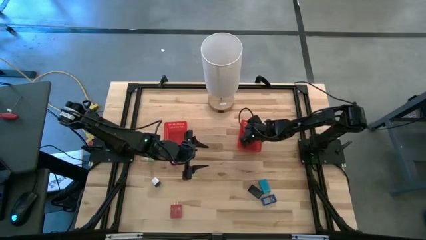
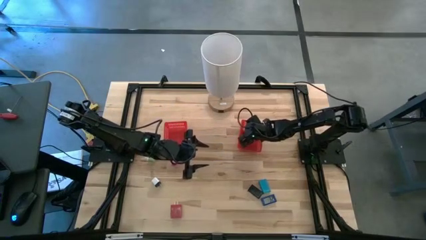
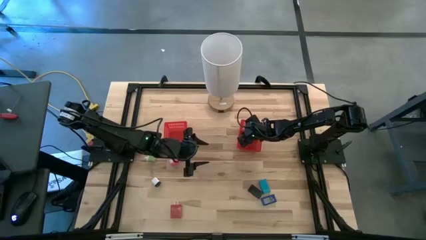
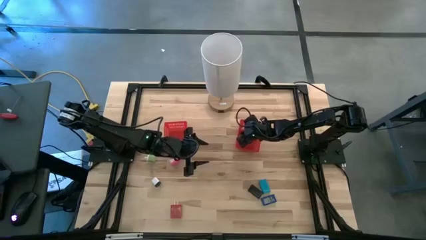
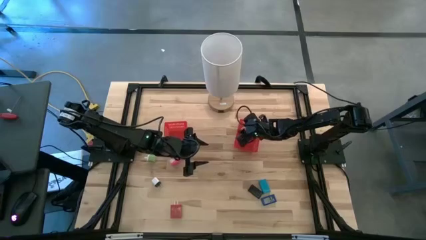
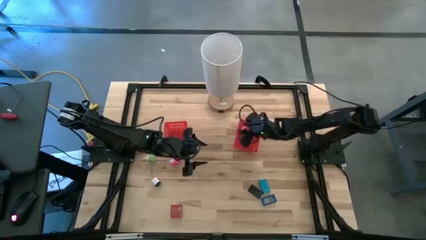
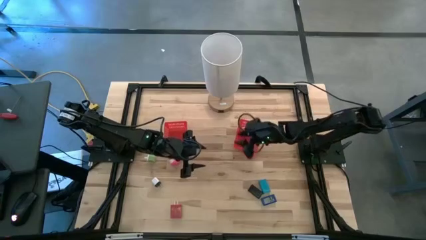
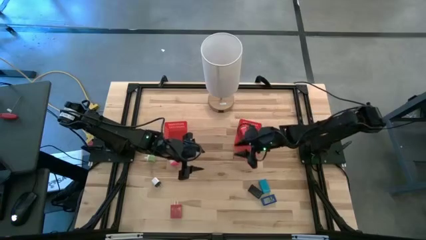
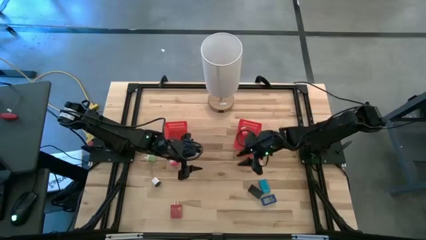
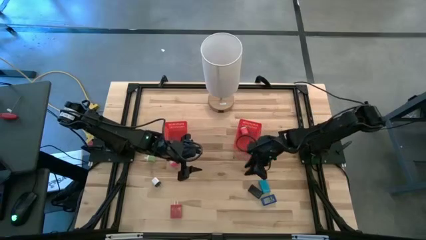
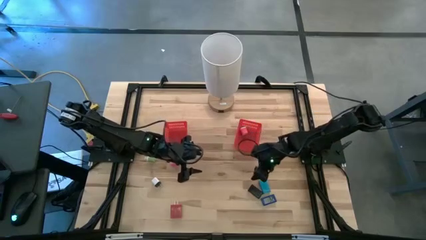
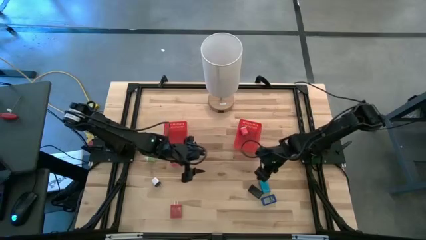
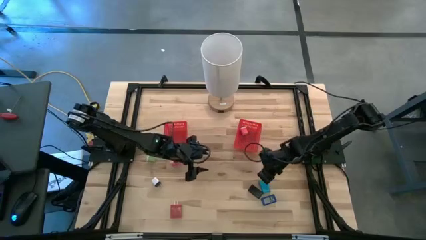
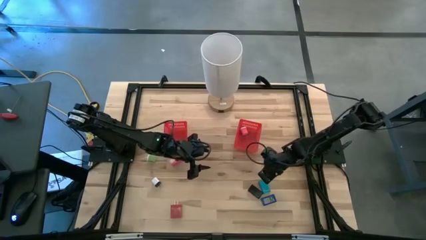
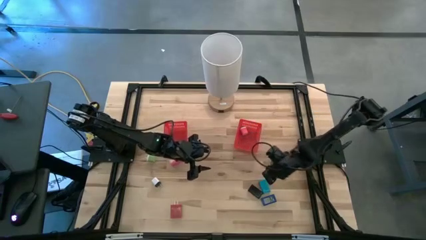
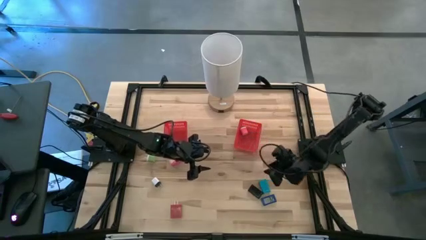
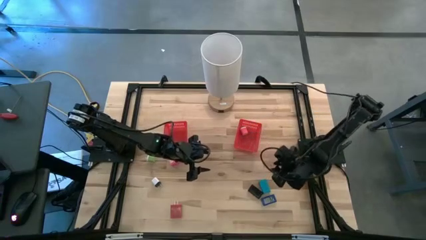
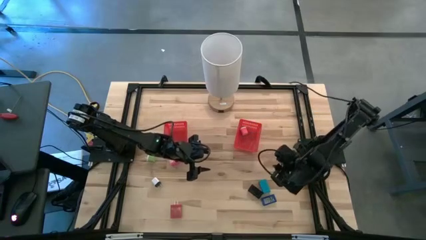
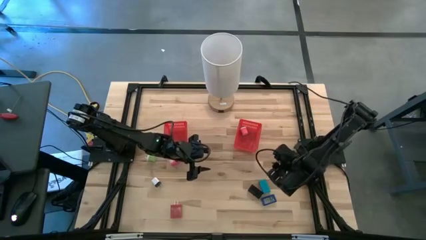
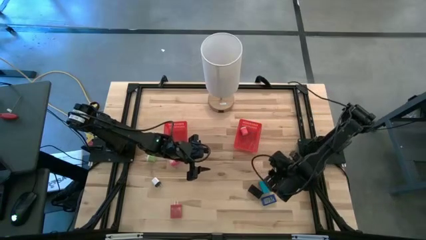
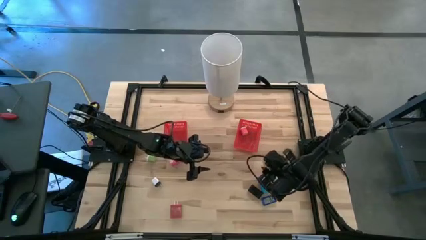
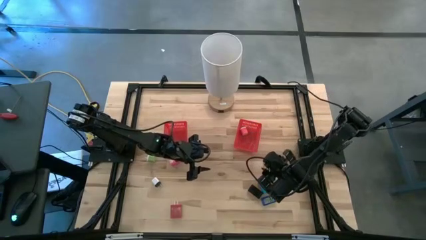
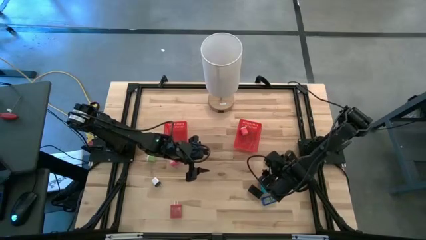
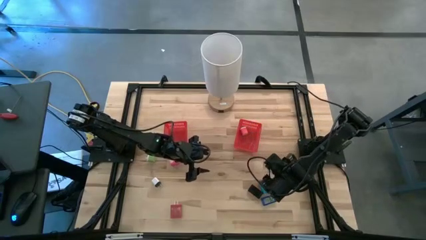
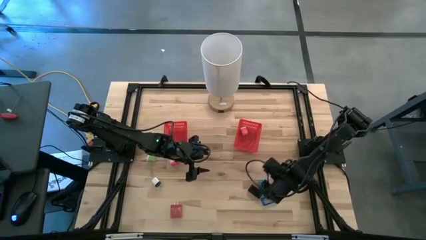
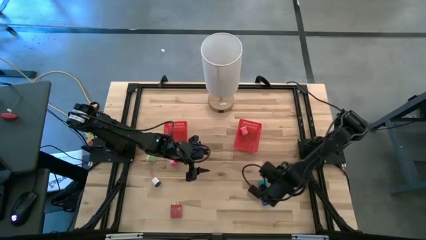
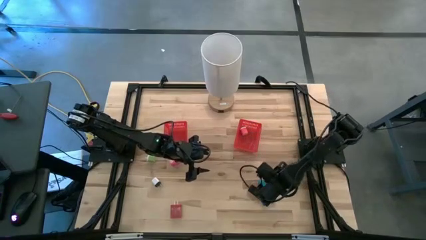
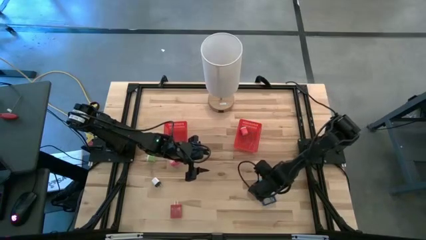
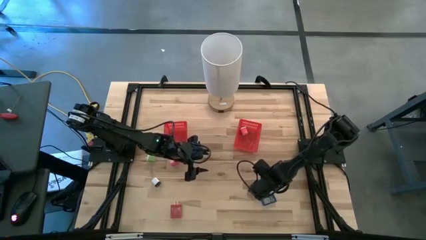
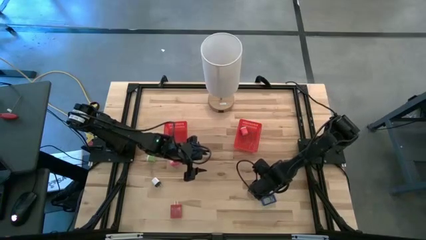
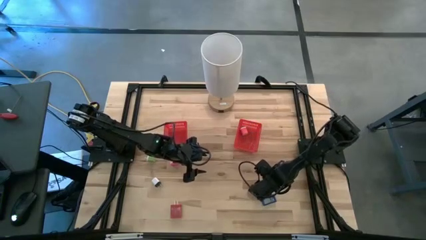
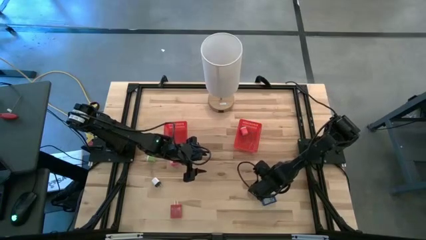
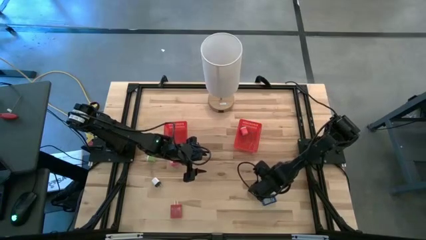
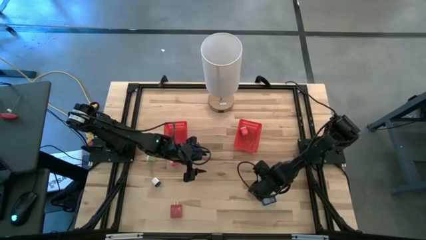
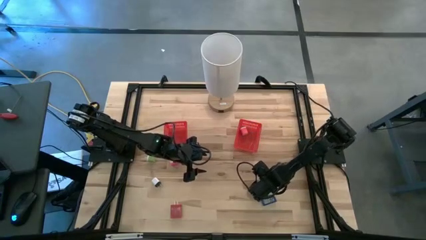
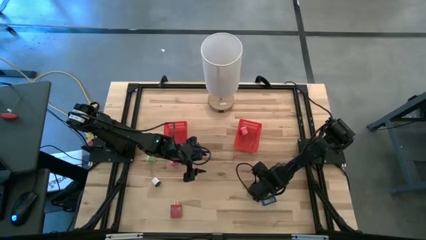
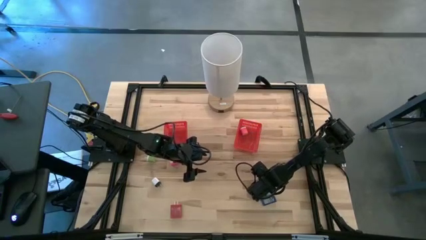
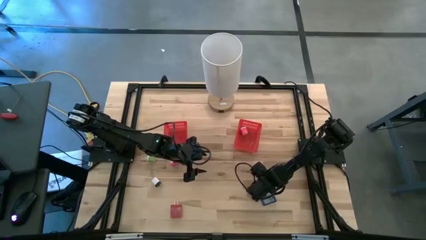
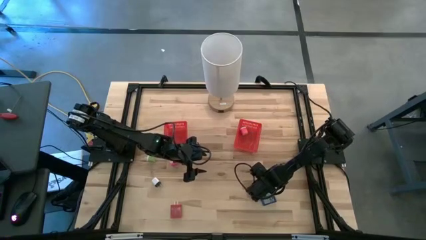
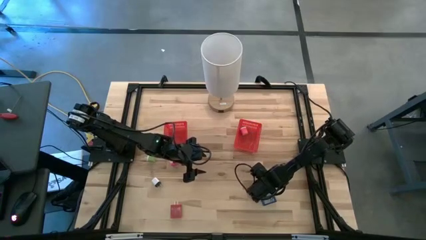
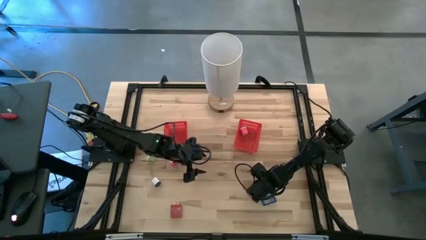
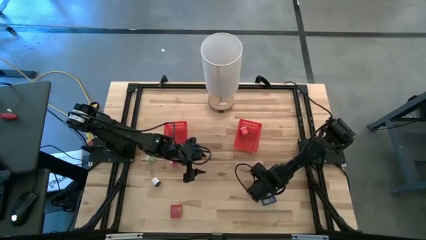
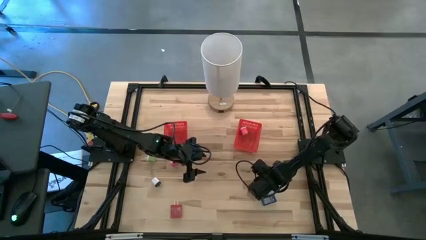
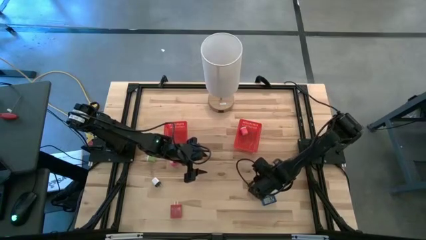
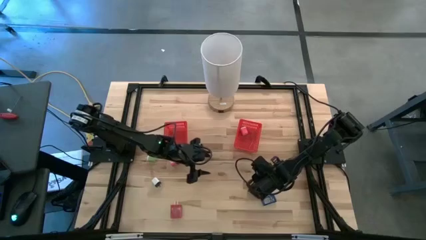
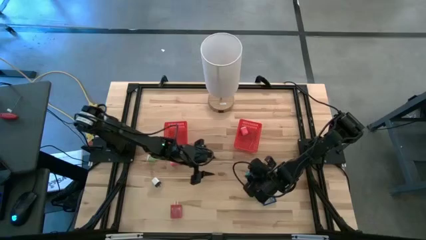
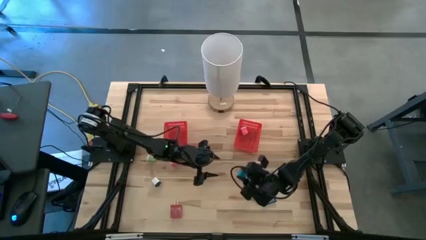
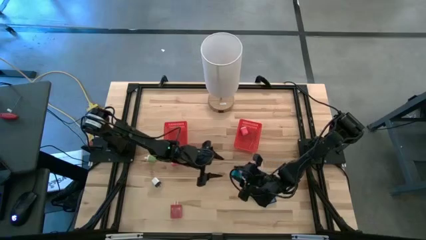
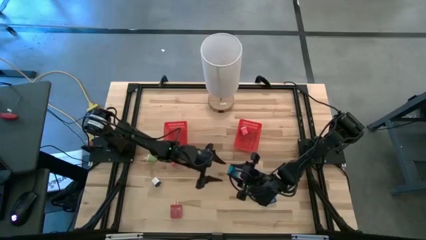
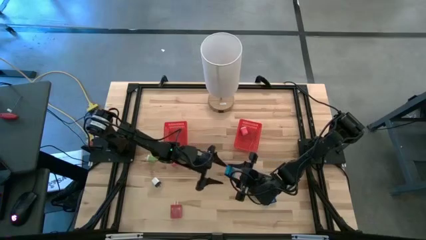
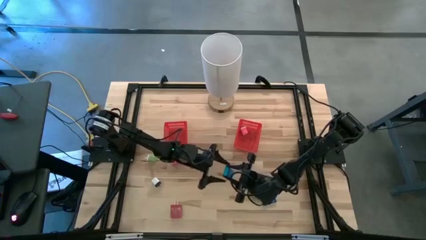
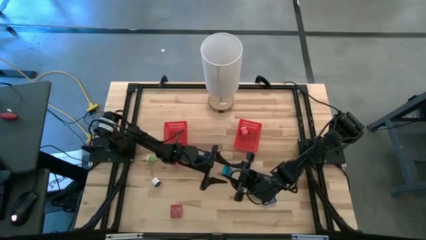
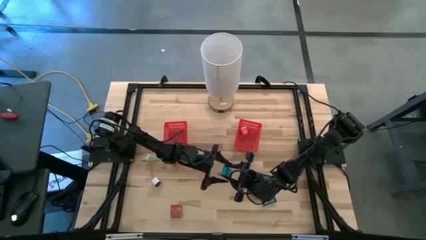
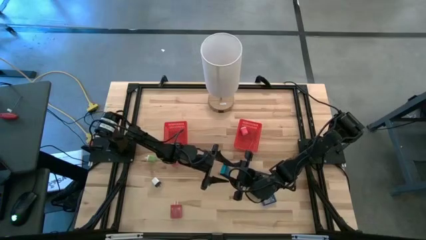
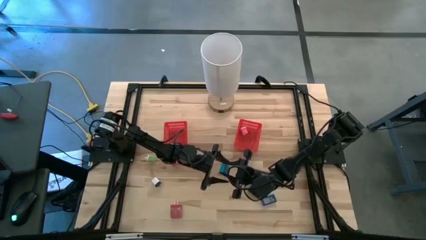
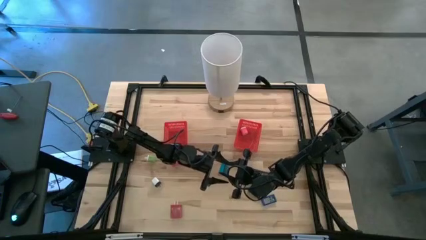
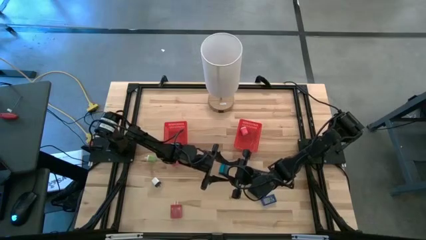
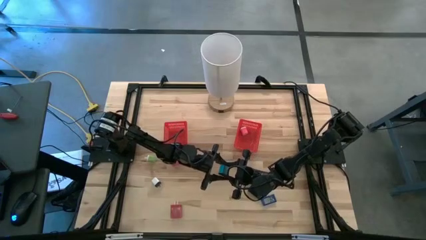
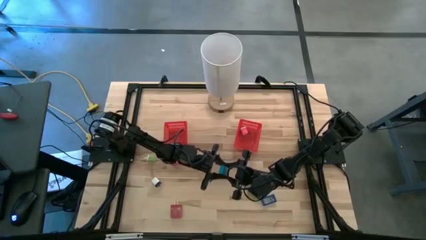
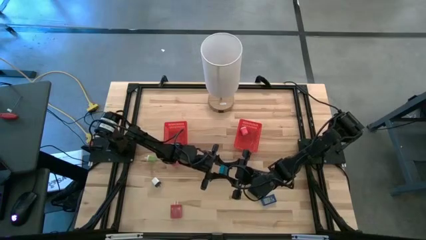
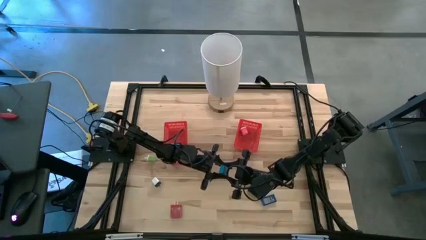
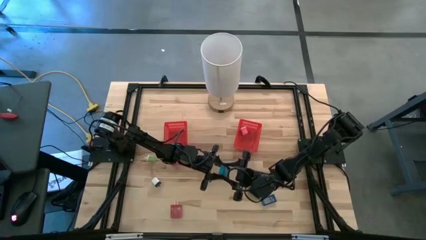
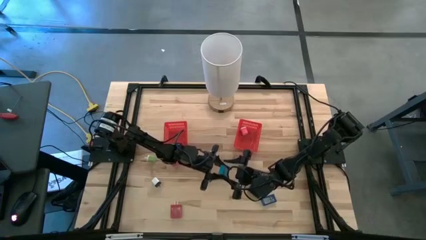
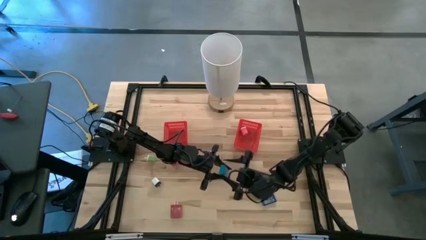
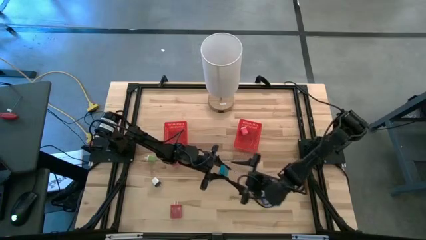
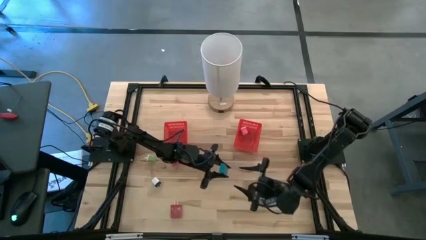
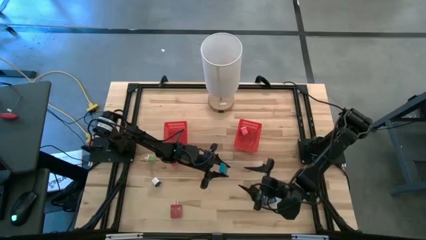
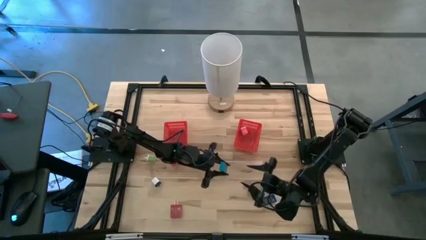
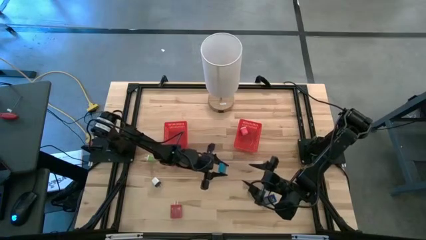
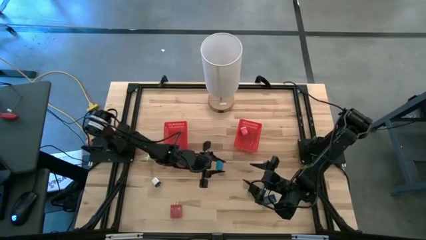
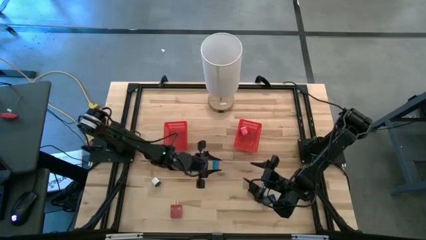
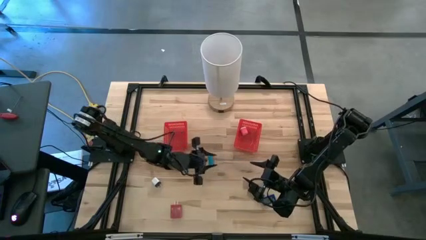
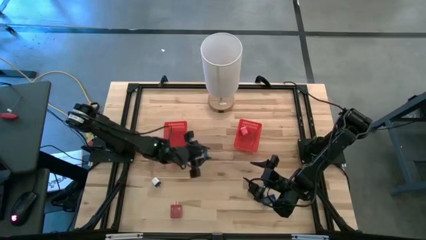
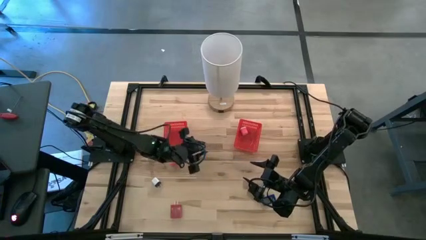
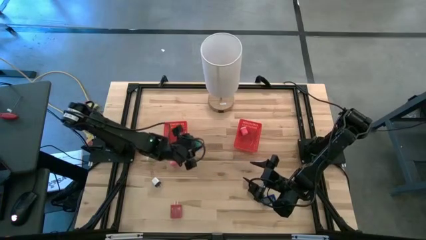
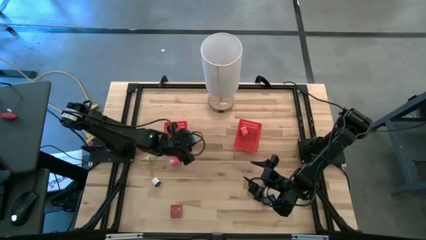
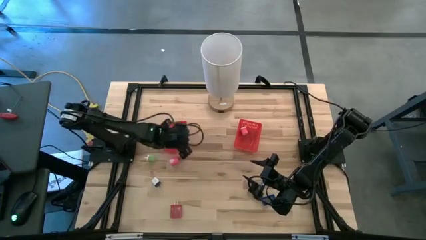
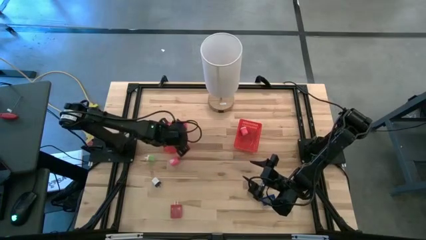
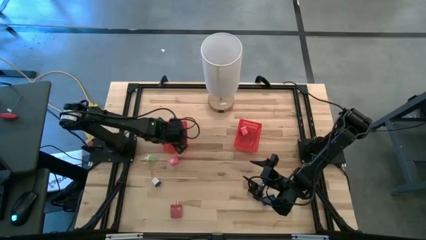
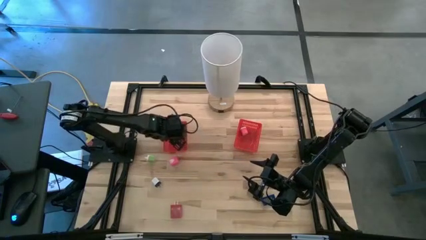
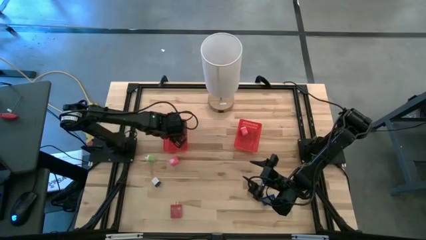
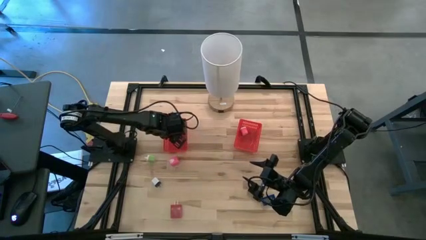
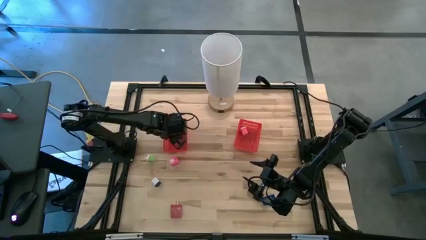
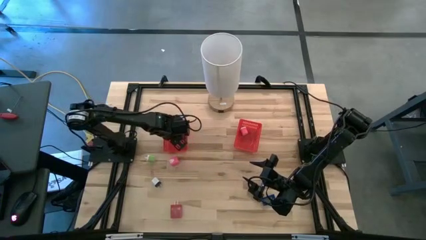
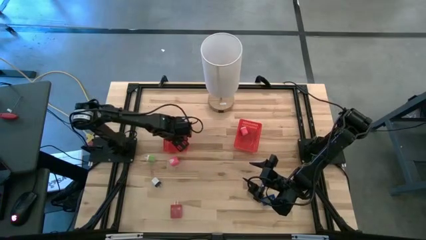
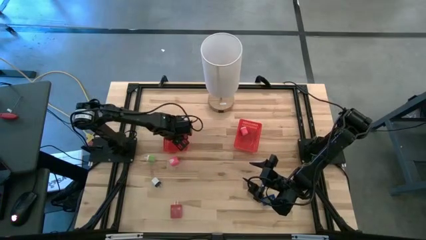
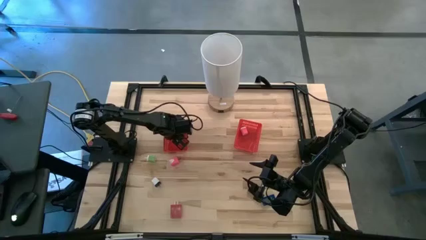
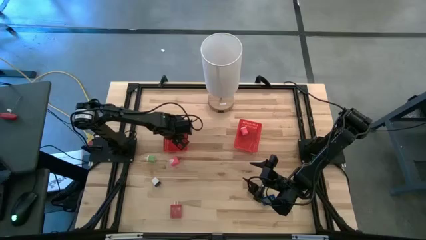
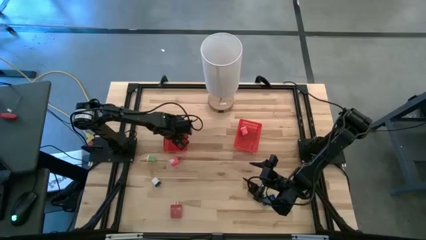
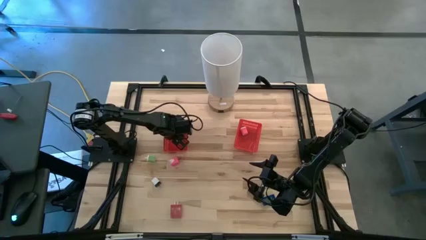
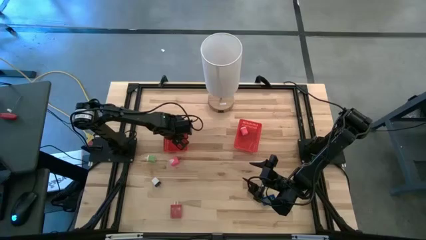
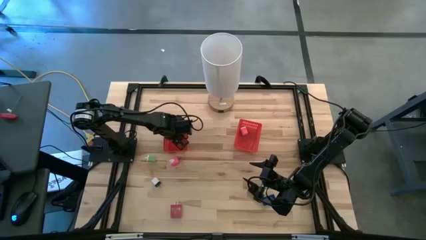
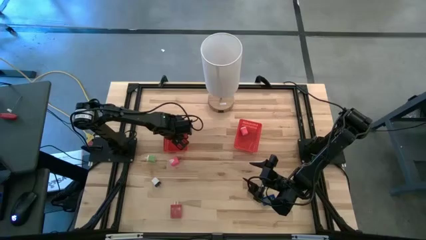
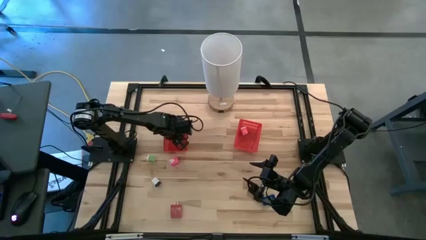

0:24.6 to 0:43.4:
Task: Pick & Place Office items
Put the light blue digital timer into the left red bin
